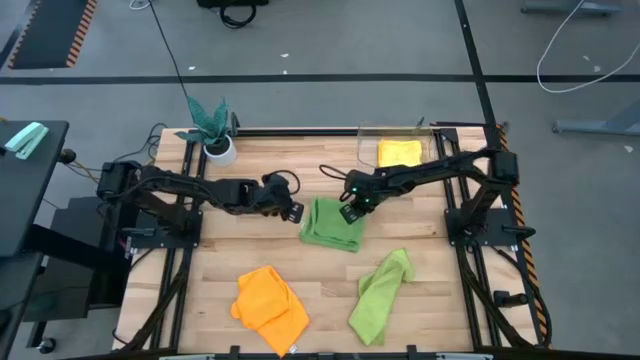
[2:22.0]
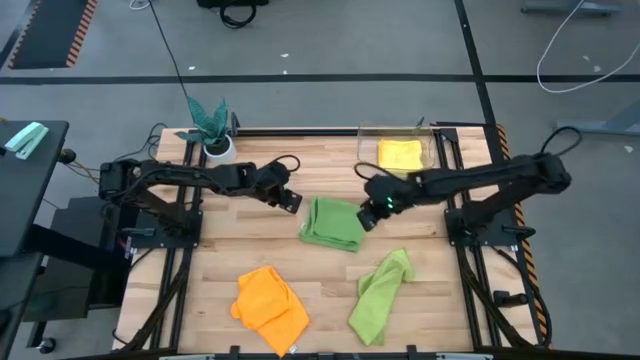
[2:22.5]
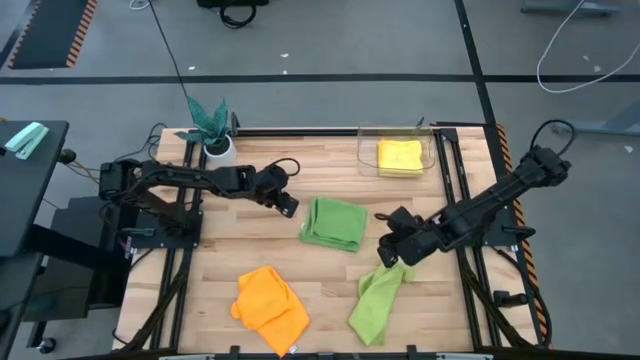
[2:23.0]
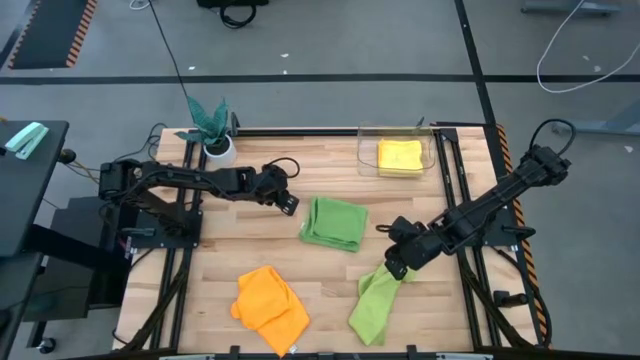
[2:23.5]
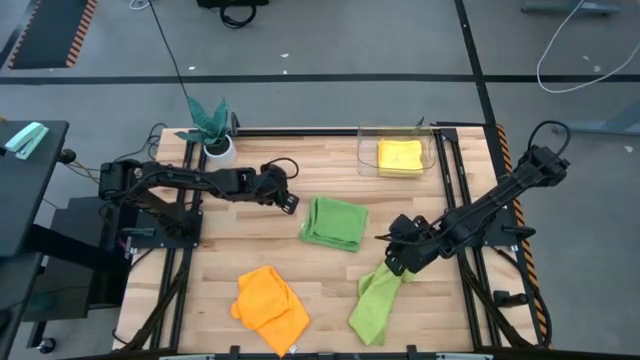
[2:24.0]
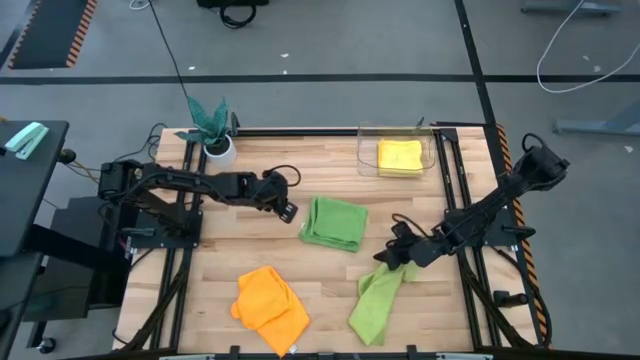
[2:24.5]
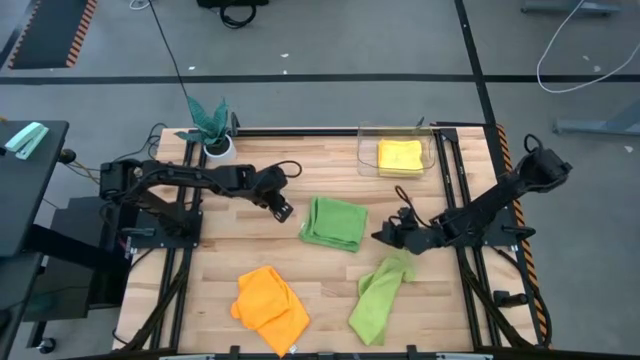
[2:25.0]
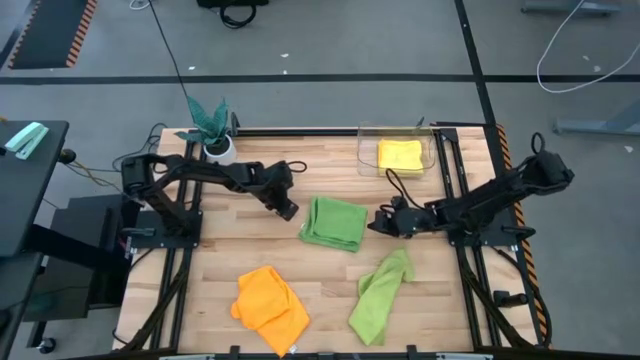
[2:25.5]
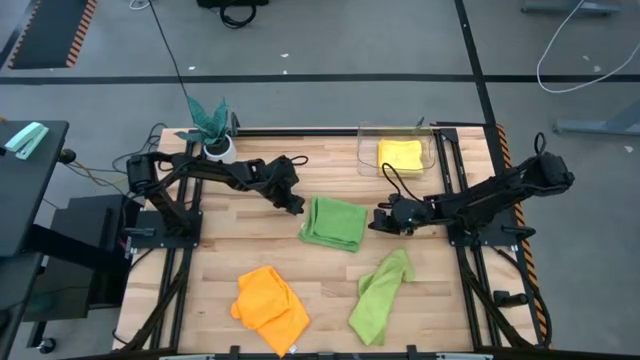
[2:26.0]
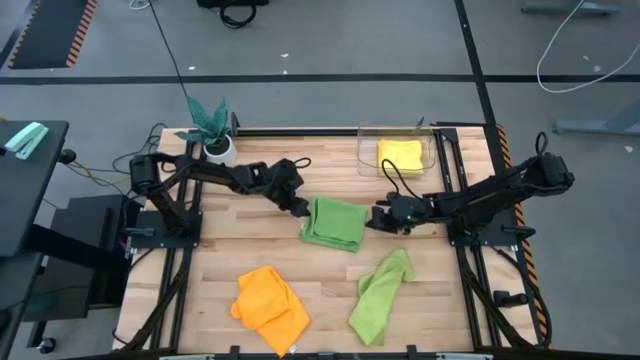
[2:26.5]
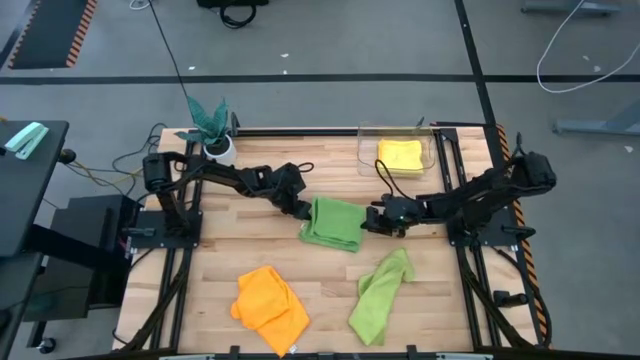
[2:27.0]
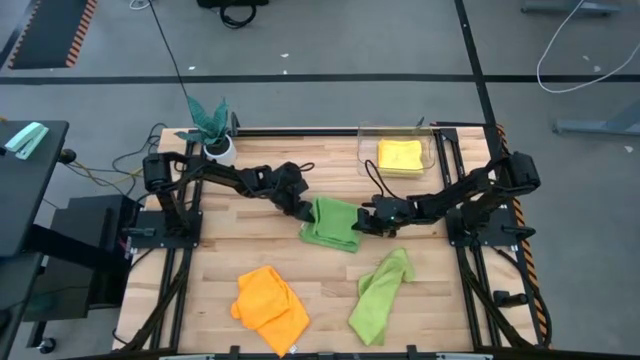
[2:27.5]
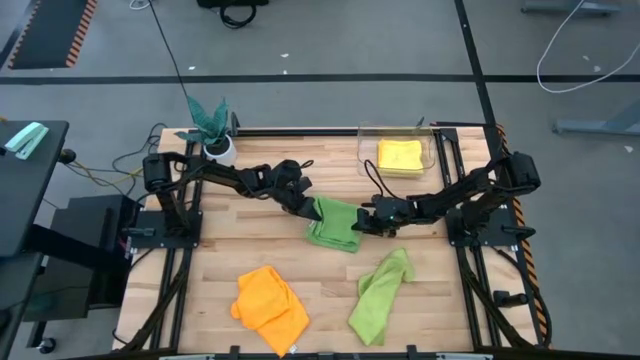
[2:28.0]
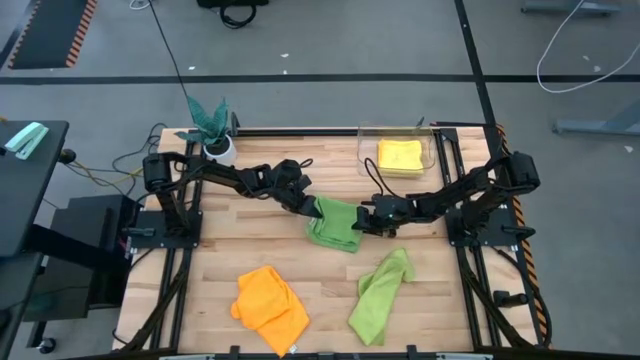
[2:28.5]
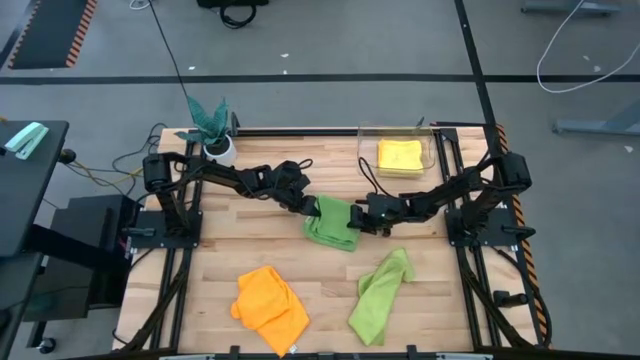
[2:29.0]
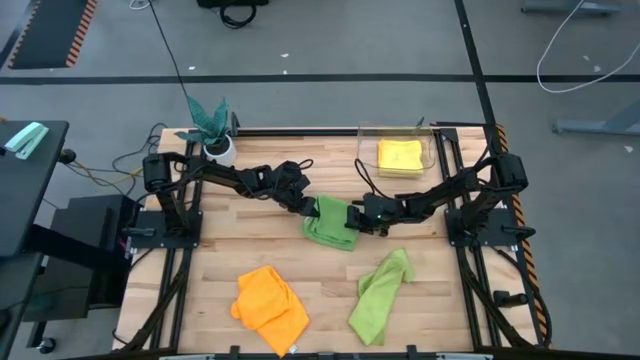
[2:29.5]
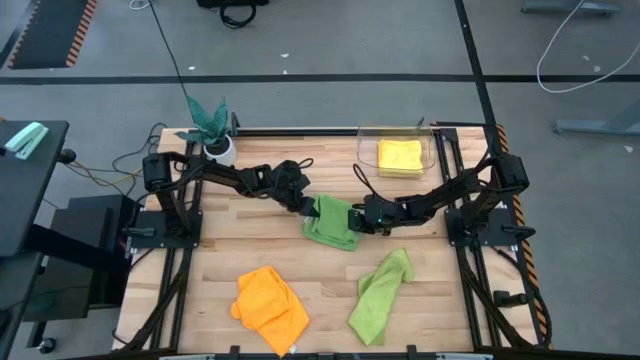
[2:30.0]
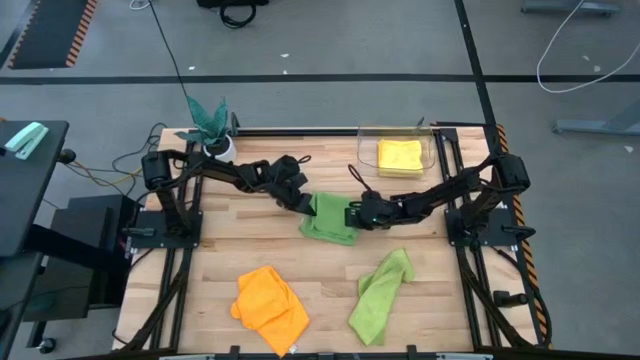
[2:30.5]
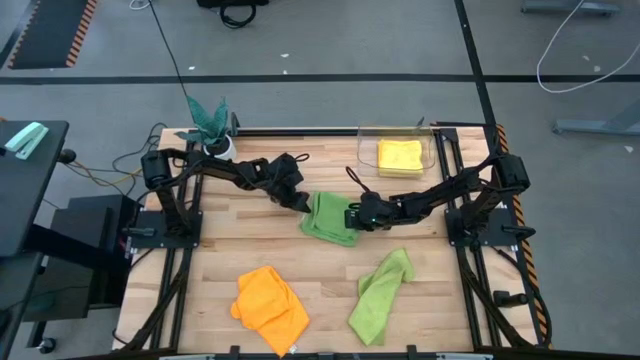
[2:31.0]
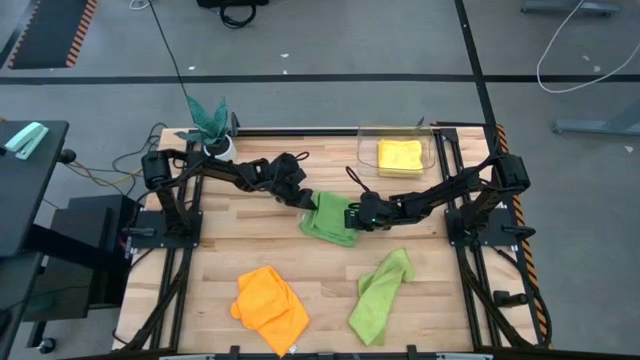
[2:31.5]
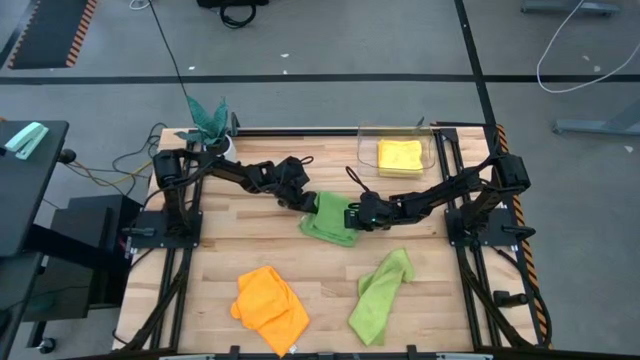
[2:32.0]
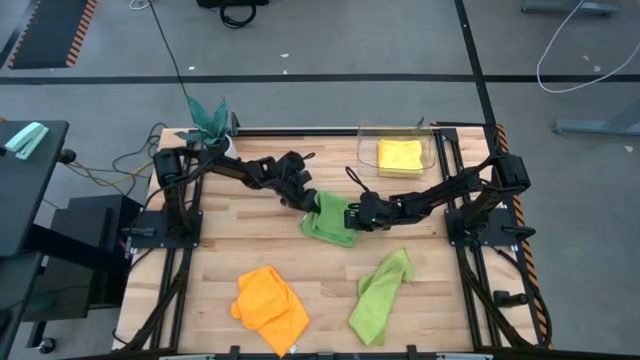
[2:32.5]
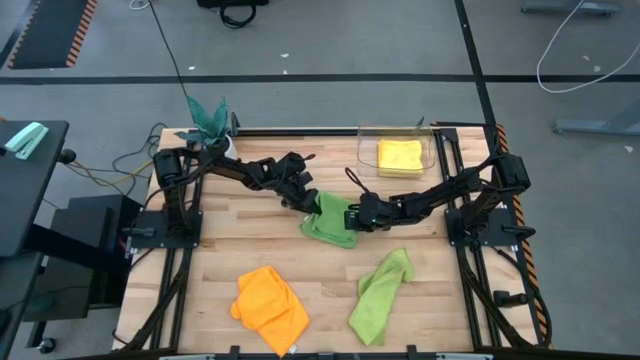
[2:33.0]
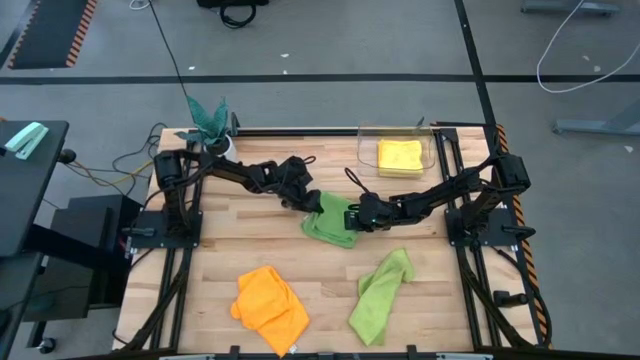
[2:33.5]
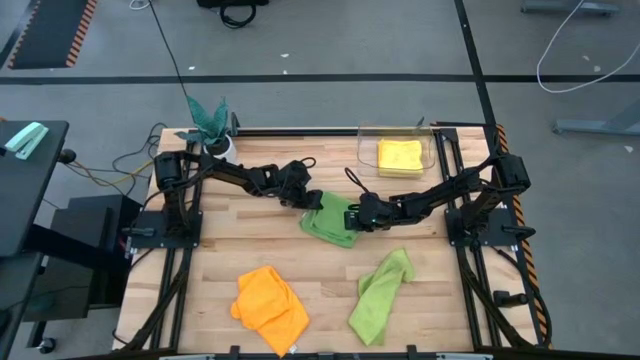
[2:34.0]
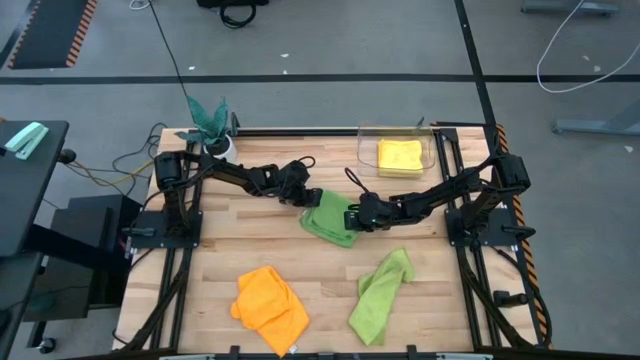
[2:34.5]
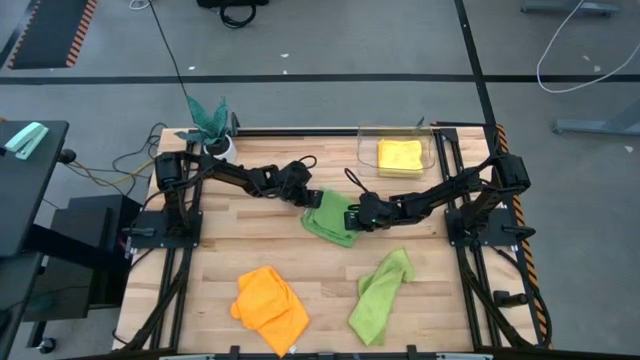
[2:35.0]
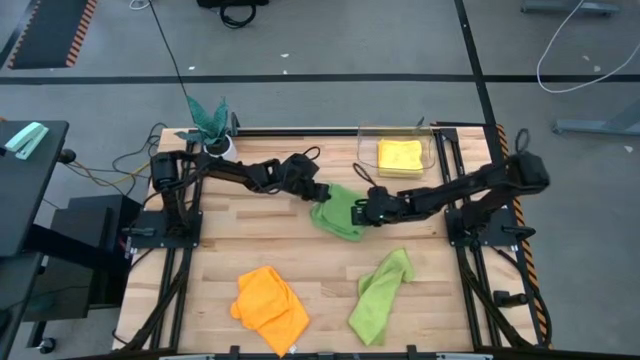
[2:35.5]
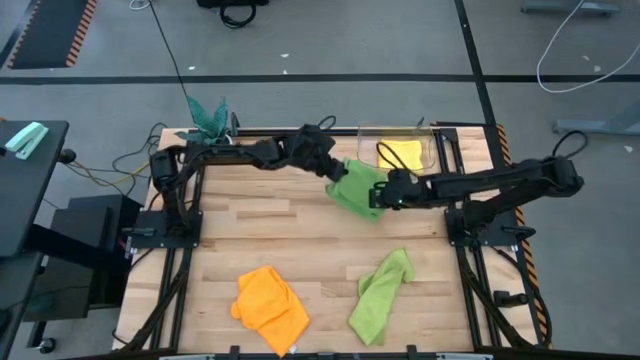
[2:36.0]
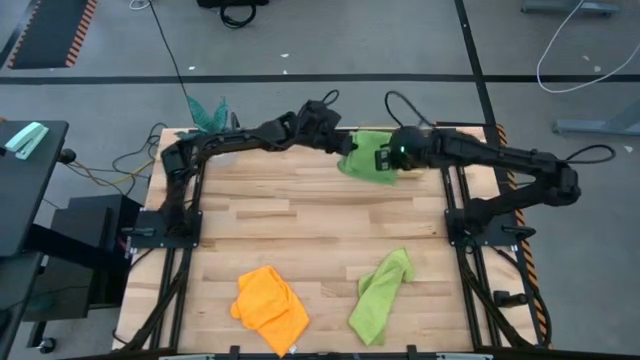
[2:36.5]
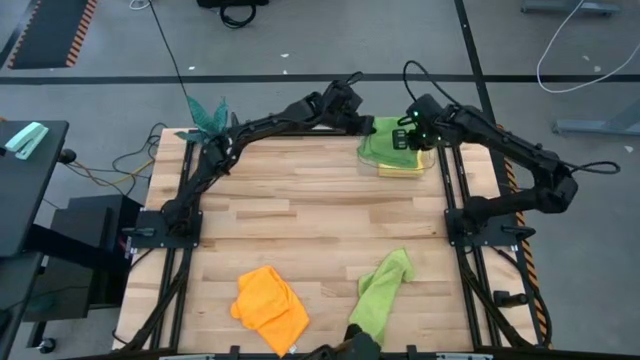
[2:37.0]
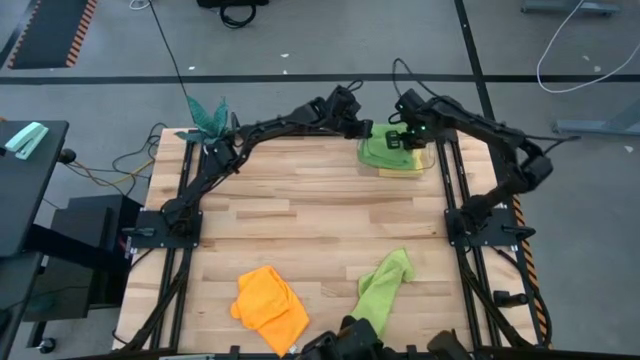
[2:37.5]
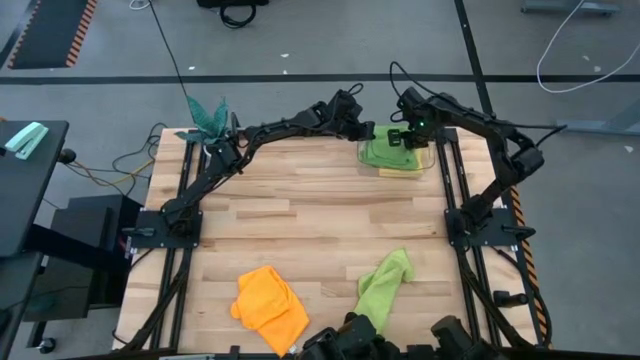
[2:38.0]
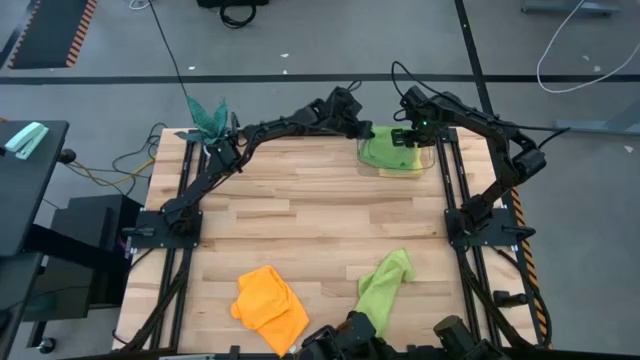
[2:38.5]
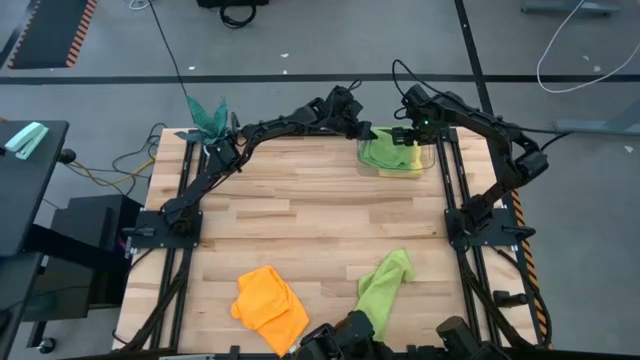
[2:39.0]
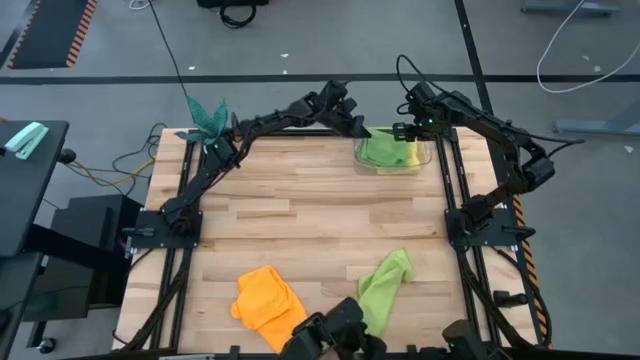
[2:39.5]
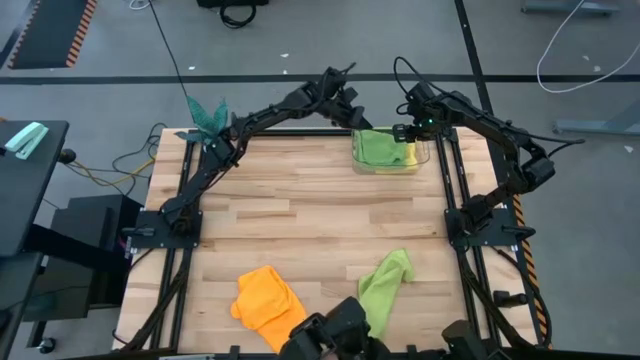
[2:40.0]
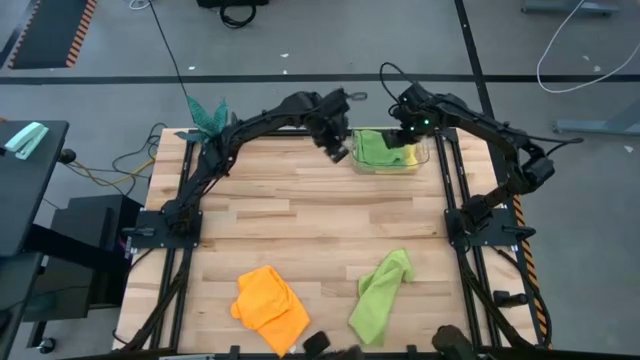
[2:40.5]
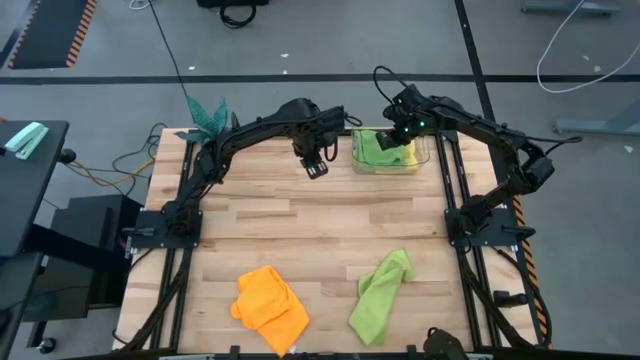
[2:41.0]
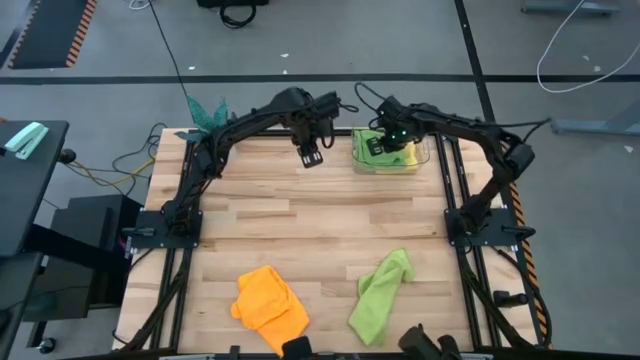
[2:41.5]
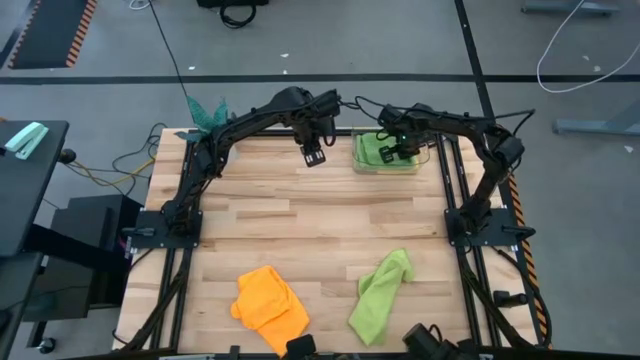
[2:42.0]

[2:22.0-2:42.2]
Task: Fold microfiber towels
Stack the green towel on top of the yellow towel in the transparent bin

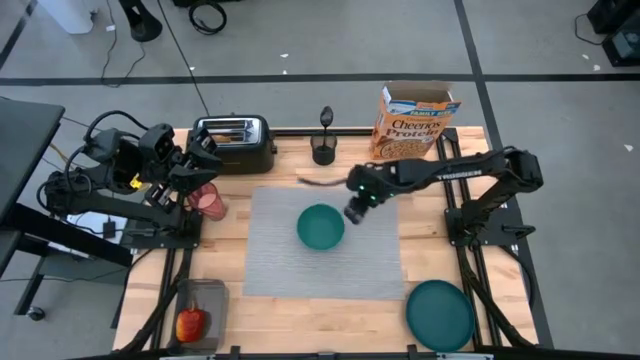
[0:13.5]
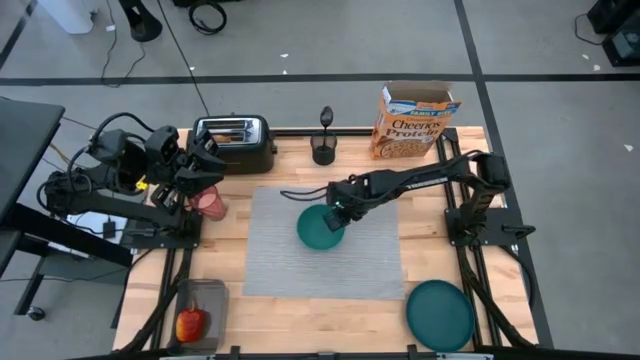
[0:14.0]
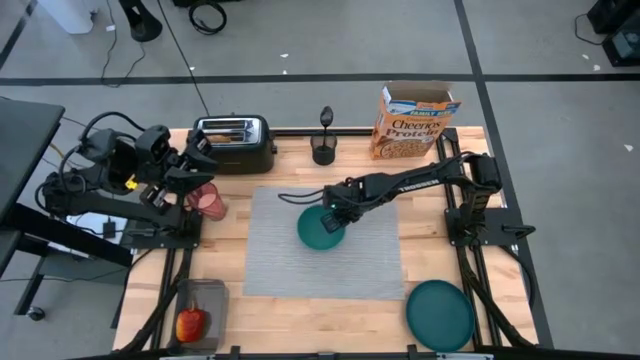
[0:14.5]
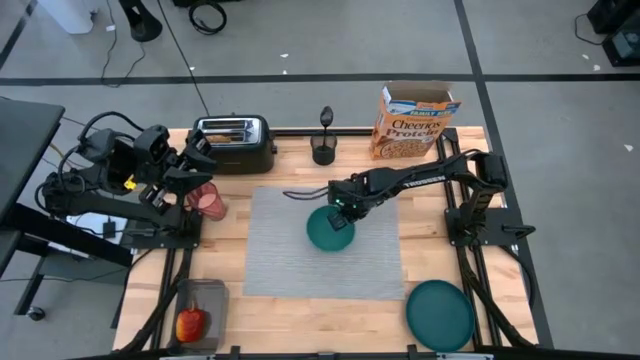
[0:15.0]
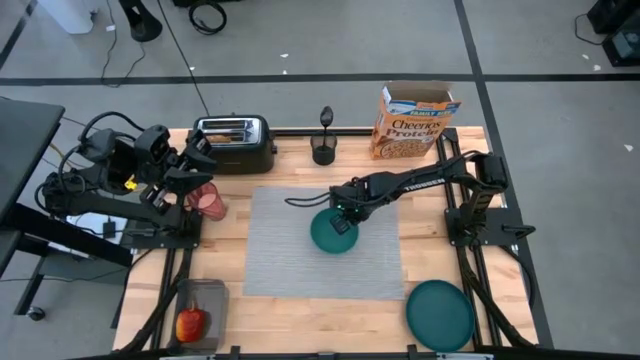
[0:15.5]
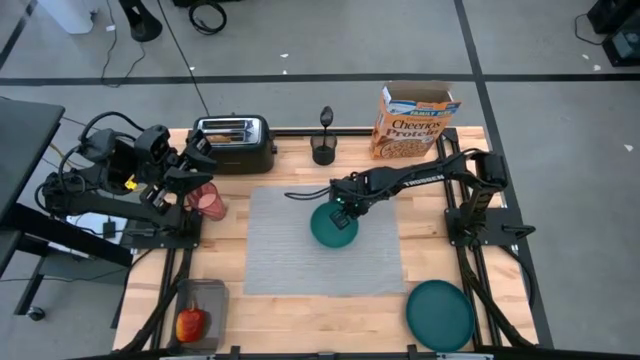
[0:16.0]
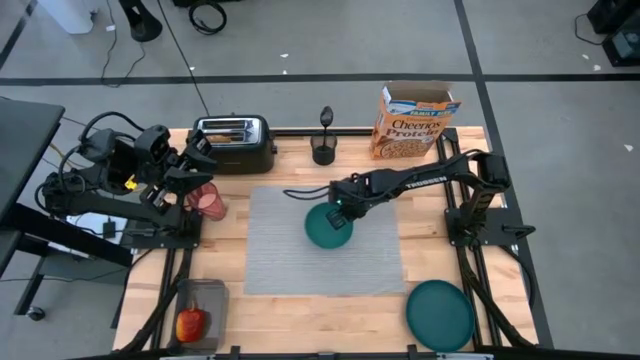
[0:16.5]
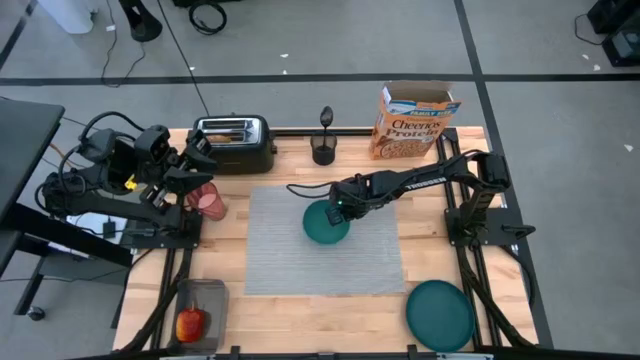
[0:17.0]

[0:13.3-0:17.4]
Task: Arrange a breakfast setting
Adjust the dark green bowl
